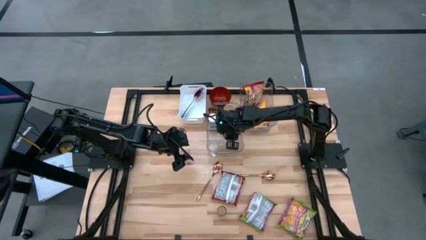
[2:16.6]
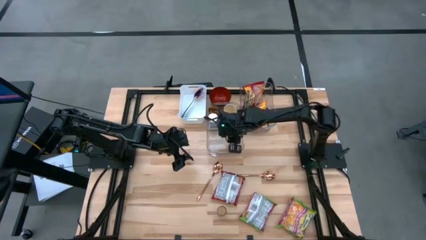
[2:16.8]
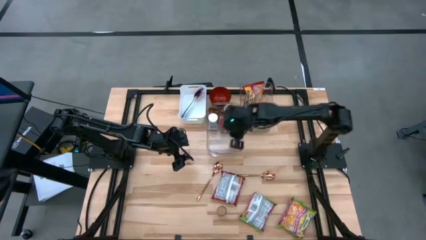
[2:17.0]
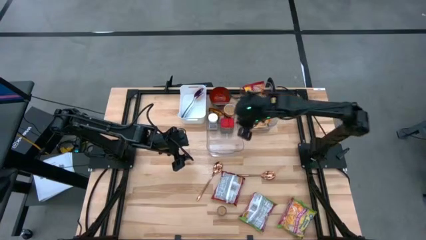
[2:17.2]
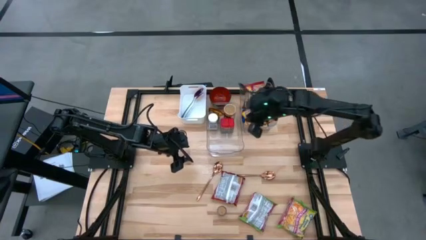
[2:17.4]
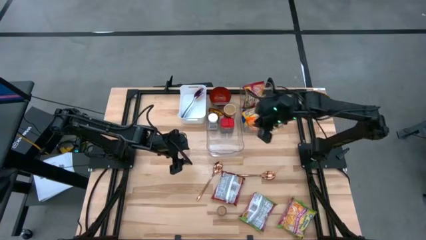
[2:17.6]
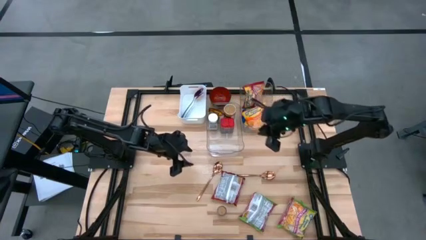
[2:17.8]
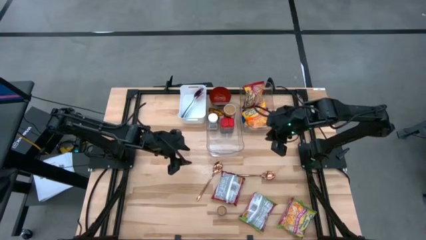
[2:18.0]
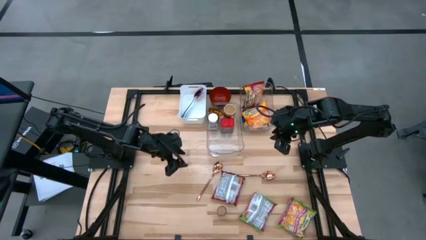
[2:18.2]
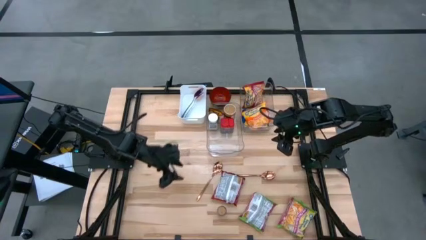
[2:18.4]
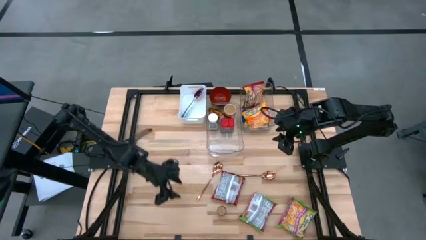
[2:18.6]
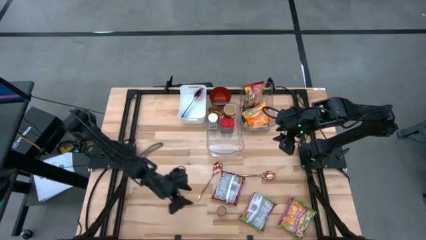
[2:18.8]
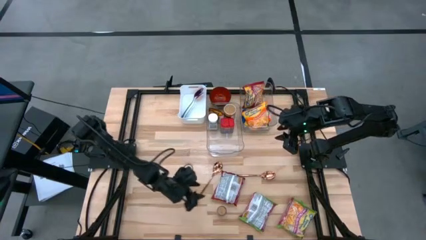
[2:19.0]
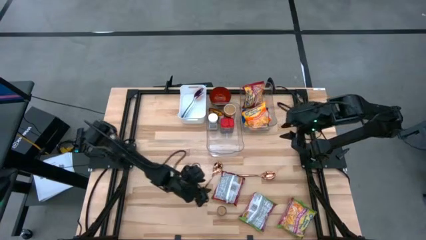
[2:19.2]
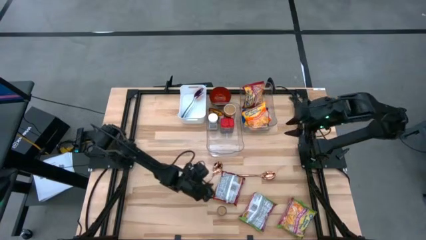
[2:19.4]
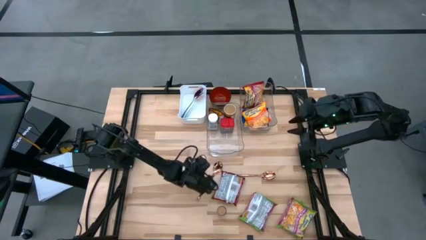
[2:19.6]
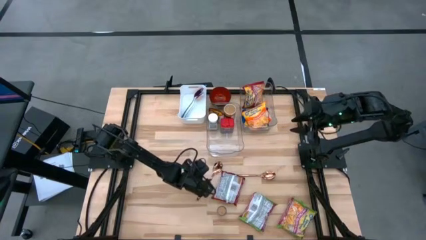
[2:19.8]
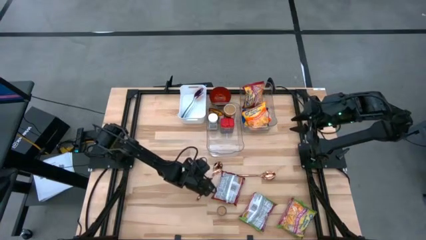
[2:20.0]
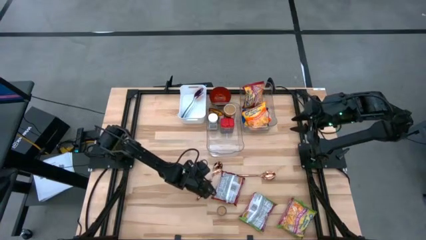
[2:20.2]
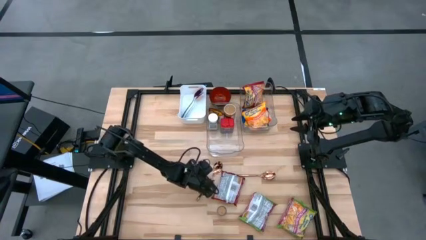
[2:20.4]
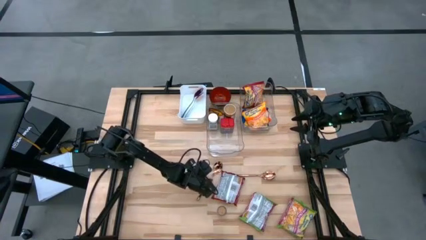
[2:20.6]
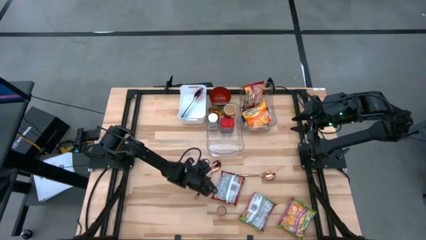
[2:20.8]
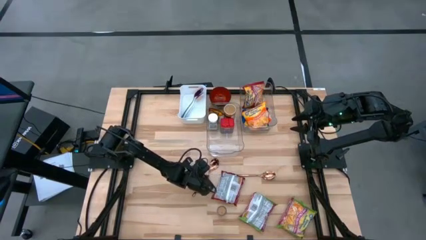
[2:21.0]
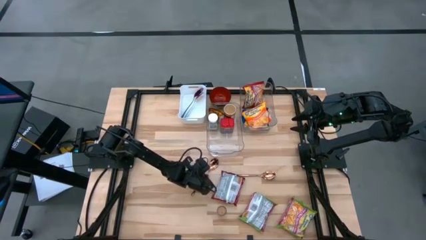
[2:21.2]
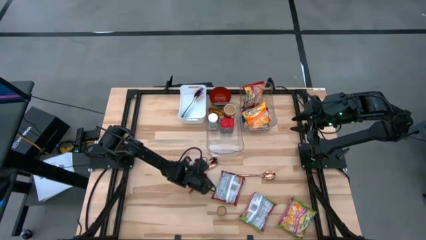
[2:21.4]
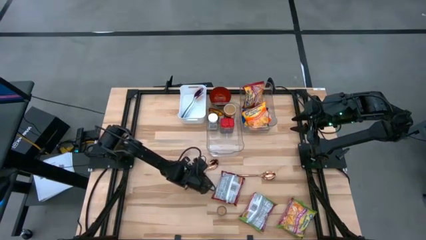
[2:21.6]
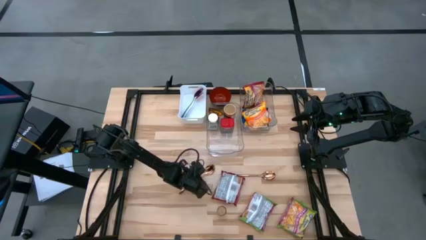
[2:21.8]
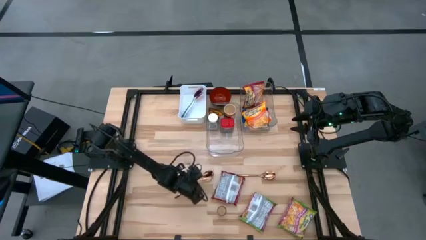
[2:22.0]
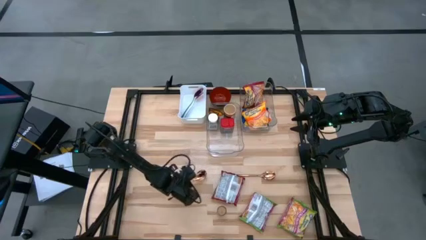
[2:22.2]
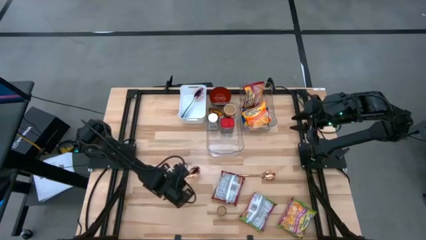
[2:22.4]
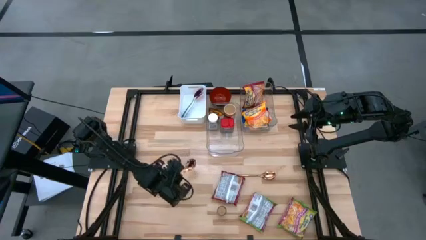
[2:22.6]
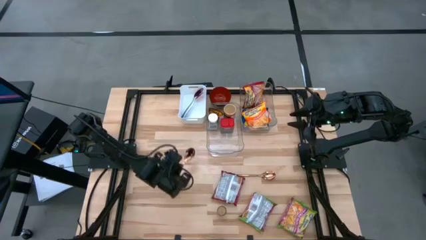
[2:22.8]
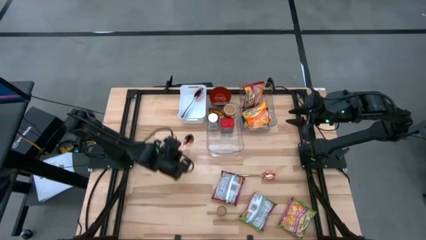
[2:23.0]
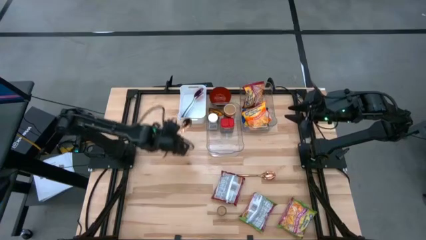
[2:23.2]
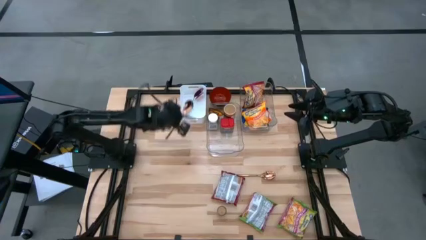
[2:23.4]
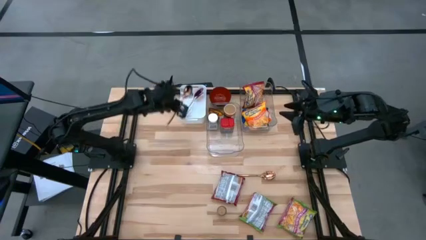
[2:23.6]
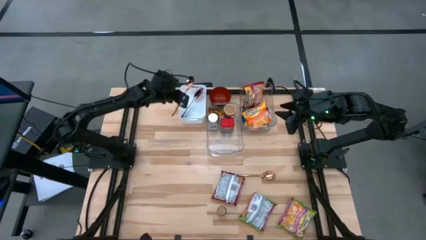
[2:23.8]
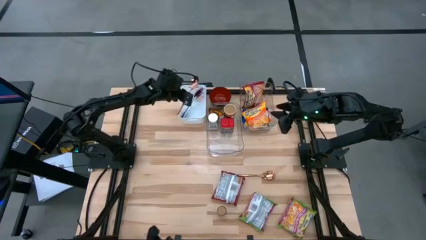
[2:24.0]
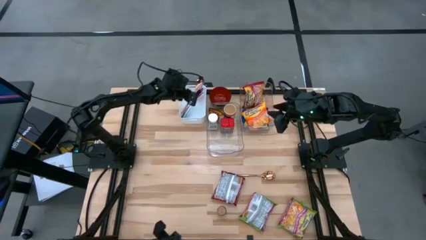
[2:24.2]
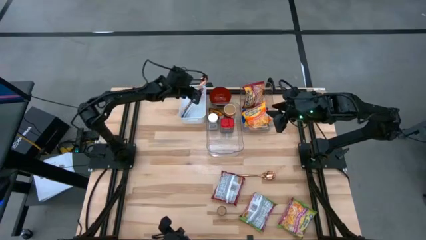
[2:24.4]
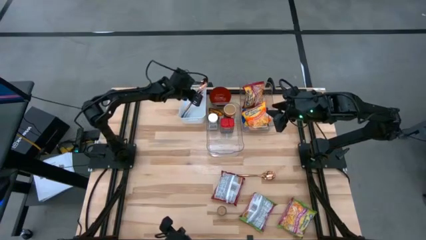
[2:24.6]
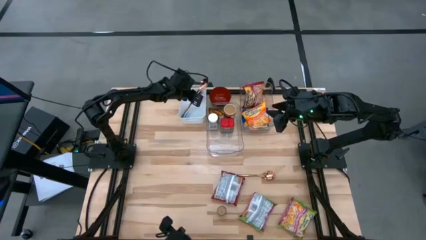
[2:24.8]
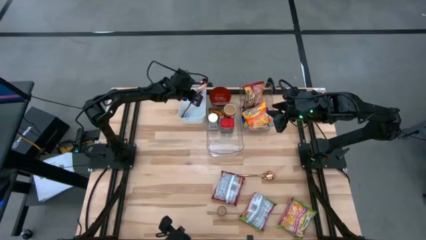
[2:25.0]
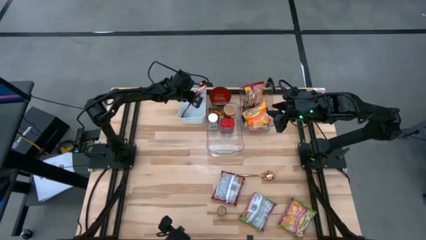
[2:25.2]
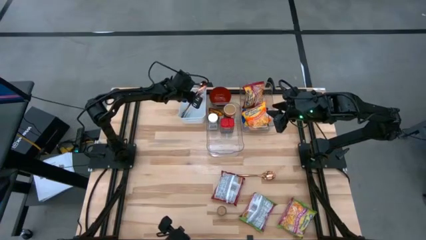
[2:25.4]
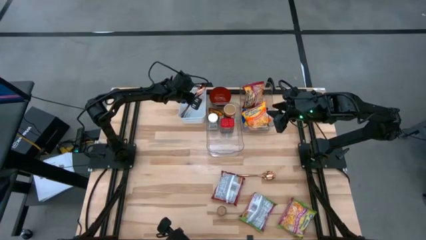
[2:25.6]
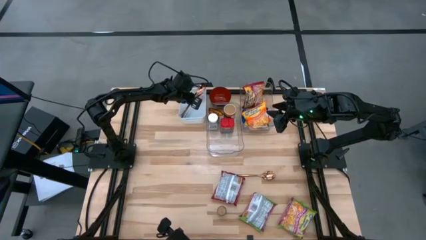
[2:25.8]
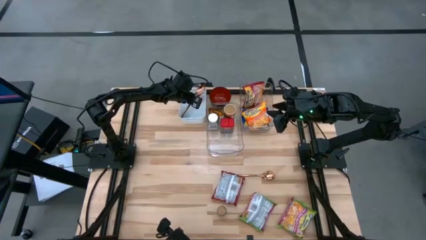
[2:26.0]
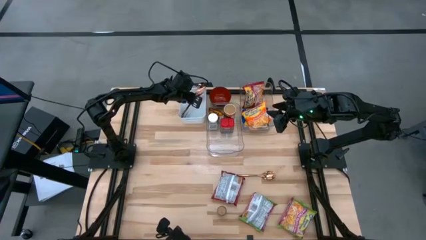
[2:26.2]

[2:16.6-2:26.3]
Task: Pick & Place Food Item
Put the left gold spoon into the white bin

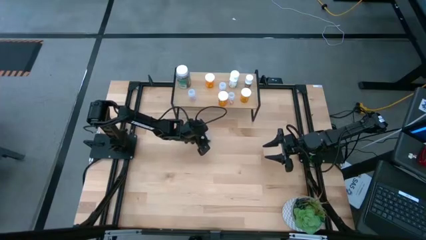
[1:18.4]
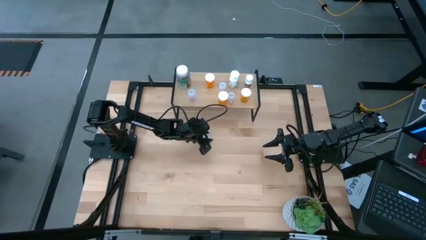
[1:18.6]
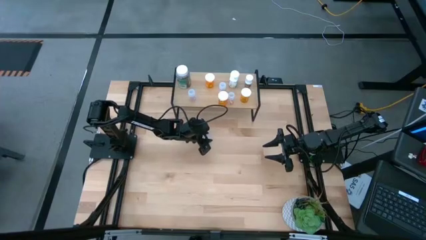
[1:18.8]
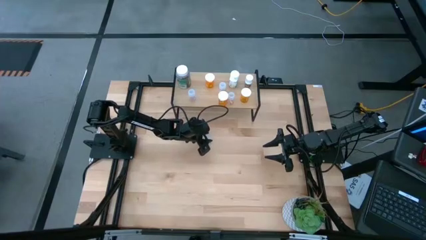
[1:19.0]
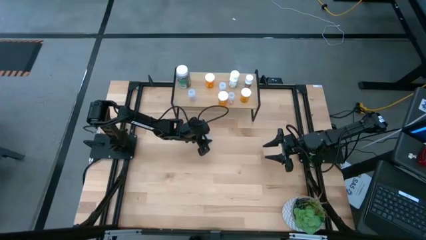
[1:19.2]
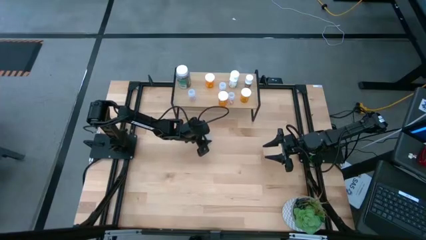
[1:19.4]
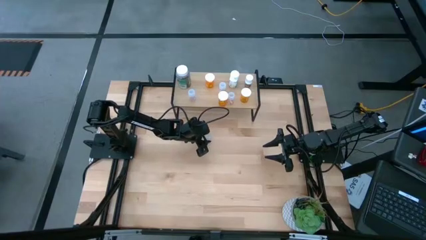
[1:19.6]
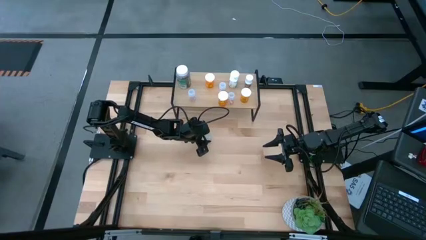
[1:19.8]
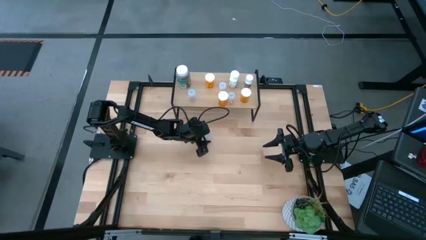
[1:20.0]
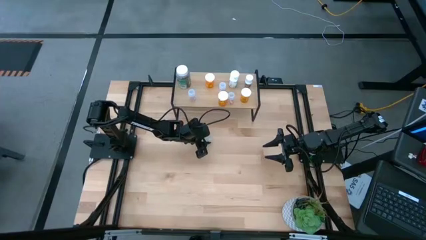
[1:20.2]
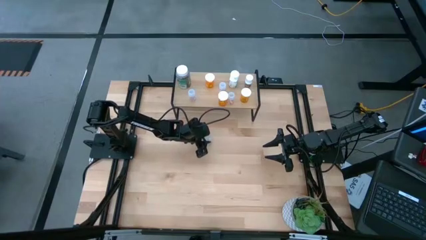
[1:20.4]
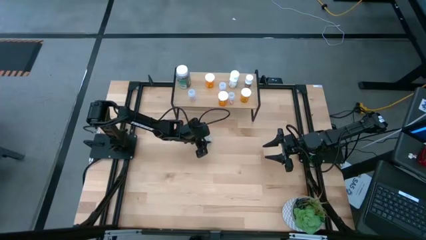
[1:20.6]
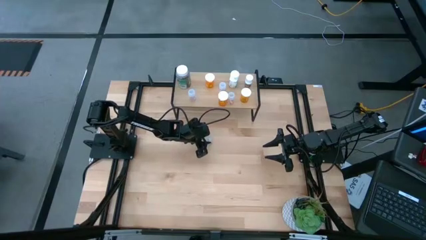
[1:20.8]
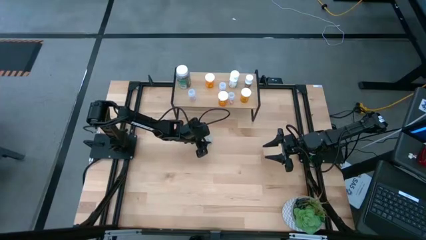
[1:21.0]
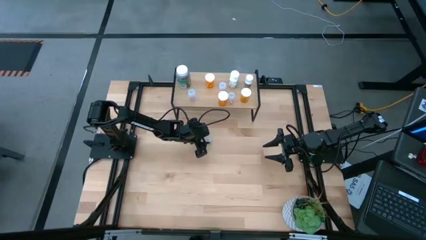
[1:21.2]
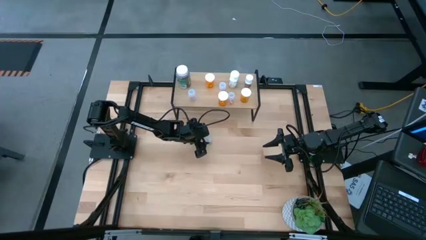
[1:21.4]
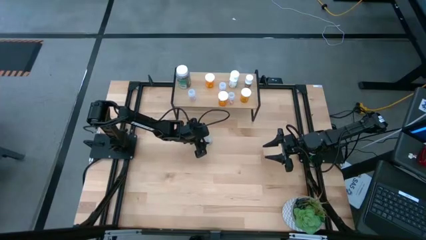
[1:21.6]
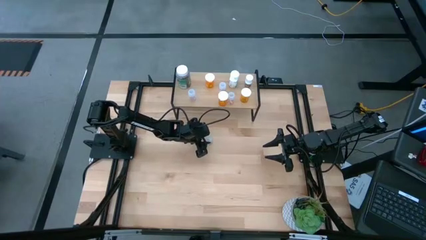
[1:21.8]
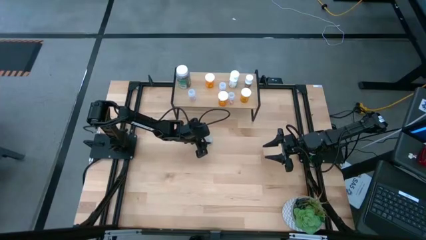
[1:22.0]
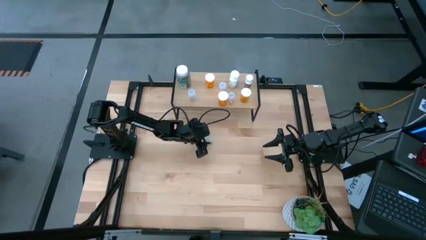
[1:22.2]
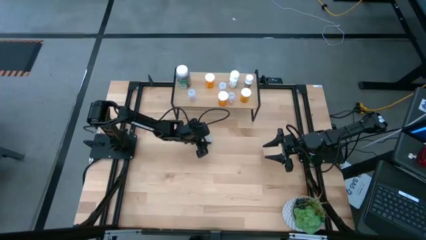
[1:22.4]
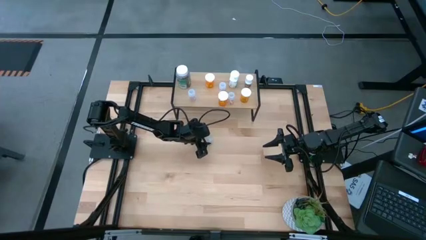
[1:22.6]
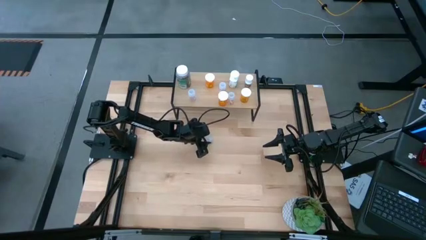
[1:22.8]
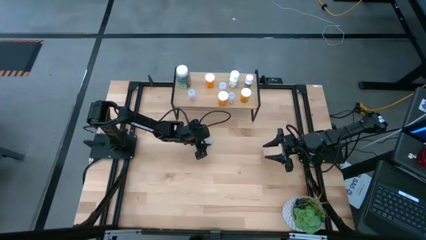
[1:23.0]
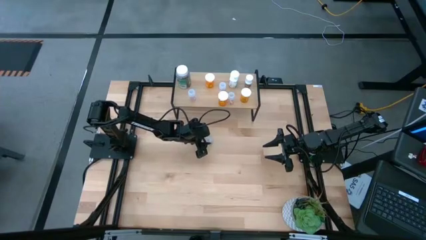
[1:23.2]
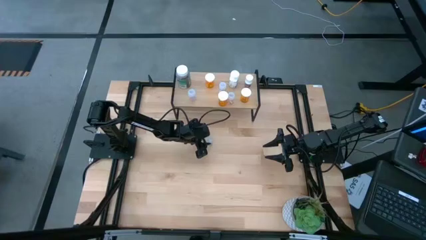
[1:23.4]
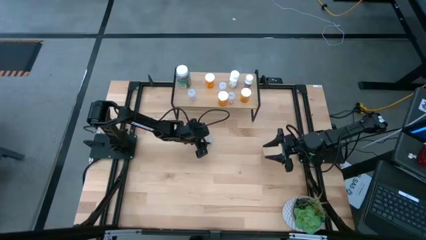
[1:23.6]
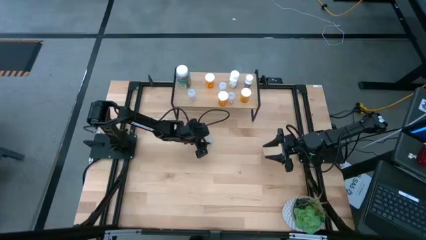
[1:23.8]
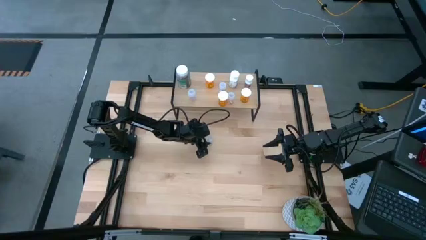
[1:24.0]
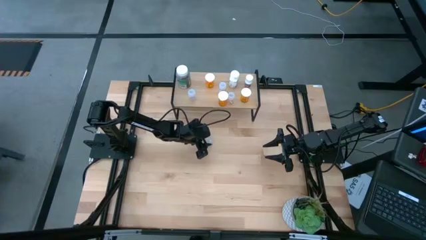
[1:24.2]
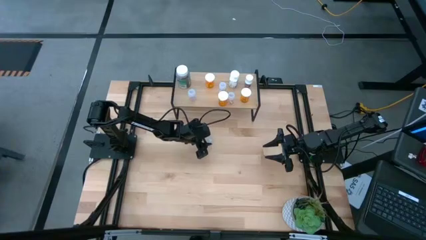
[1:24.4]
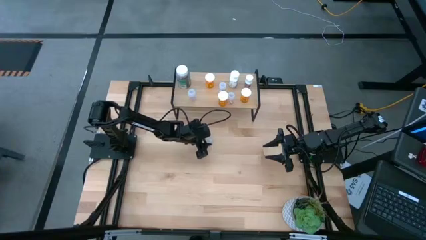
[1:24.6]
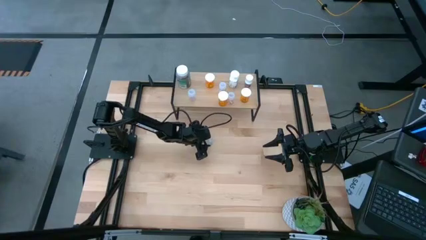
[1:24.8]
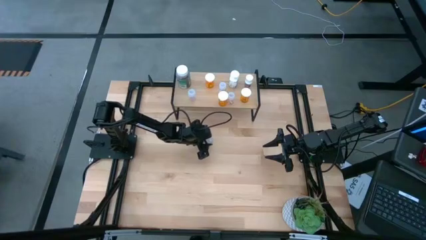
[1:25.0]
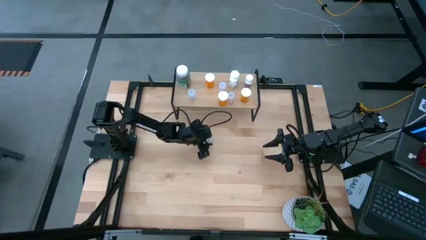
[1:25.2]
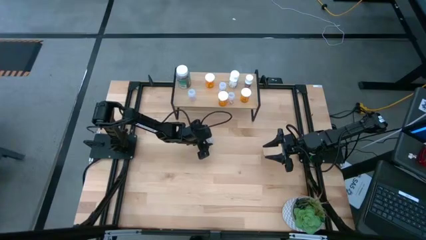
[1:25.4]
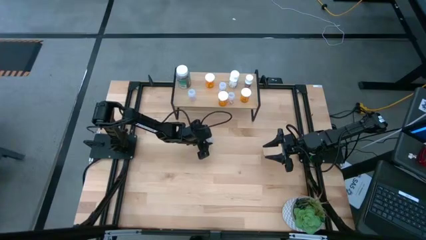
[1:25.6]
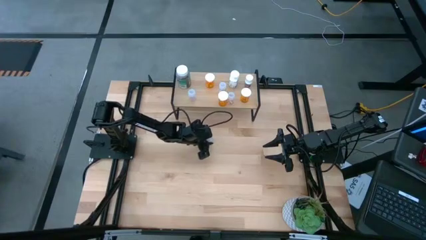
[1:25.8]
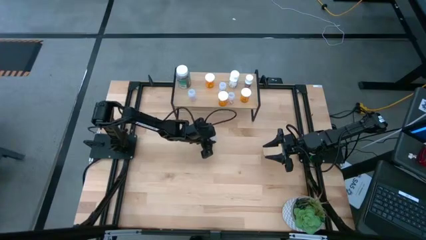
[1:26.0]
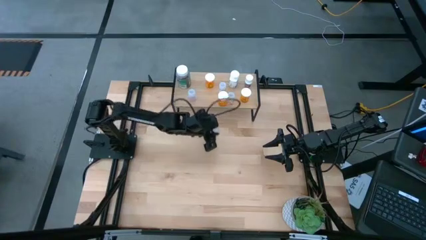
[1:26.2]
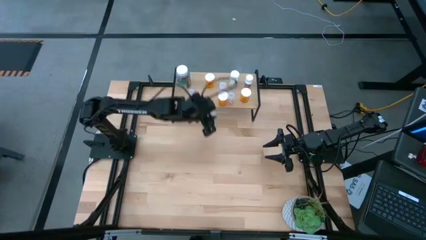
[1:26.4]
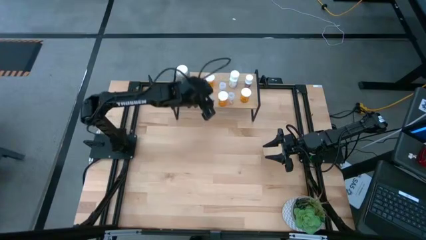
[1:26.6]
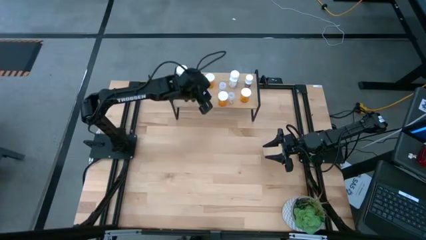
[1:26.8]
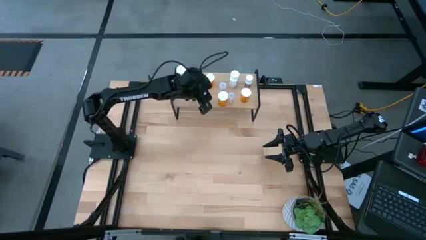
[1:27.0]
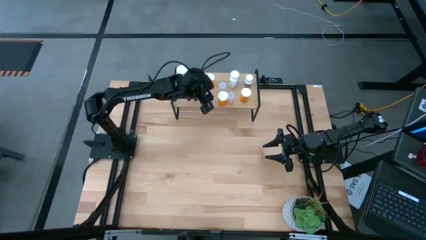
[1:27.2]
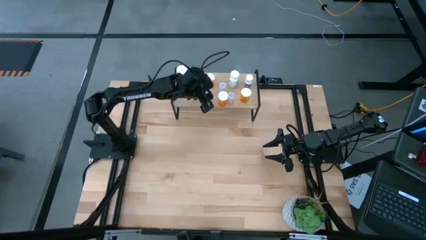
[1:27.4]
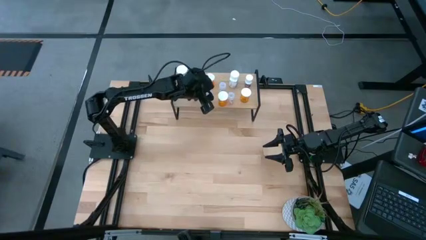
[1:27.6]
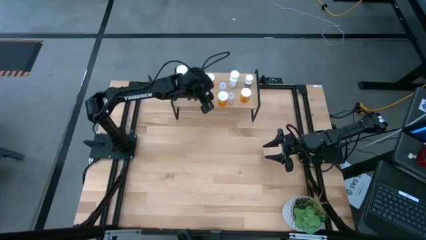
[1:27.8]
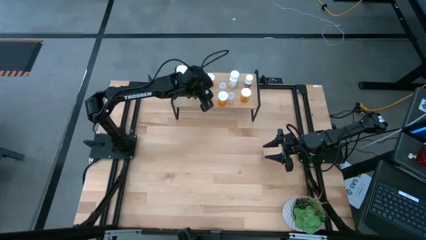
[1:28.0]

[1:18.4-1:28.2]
Task: Pick and place medicine bottles onto shelf by color
Put the transparent pill bottle on the shelf
